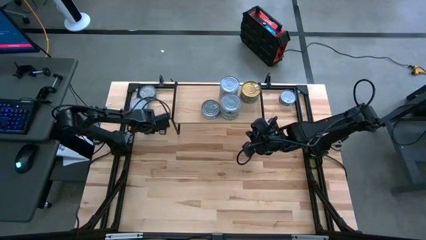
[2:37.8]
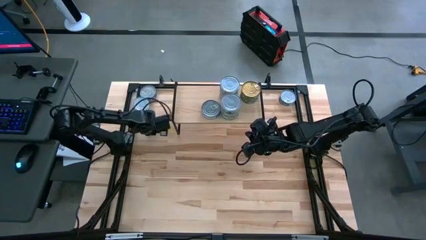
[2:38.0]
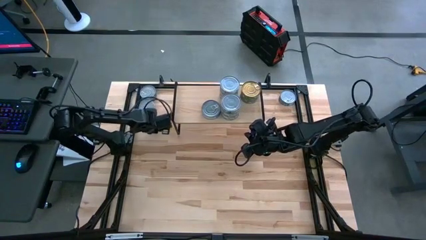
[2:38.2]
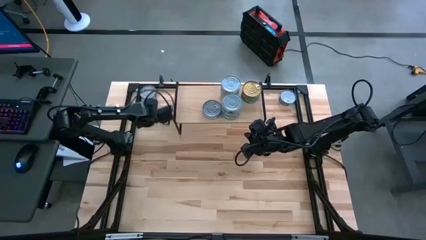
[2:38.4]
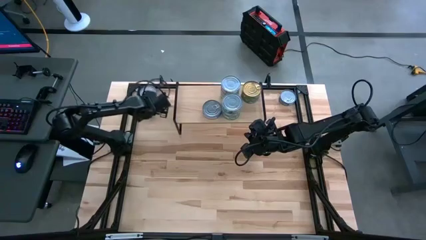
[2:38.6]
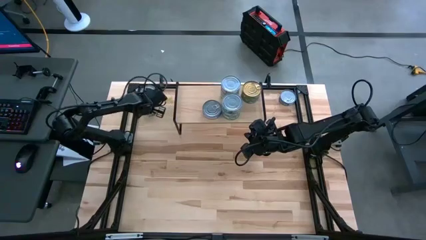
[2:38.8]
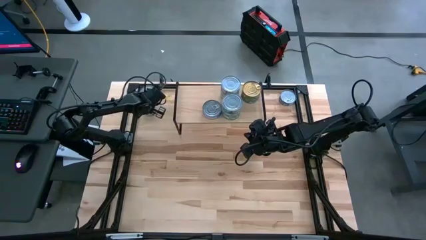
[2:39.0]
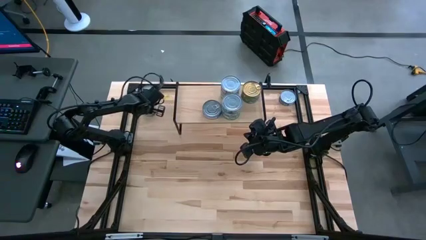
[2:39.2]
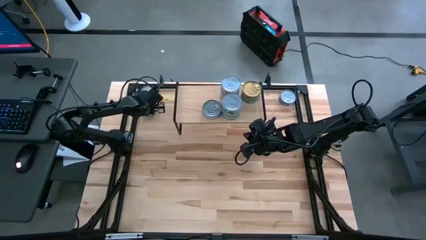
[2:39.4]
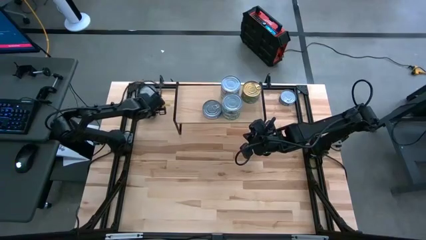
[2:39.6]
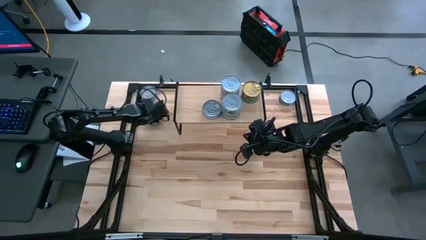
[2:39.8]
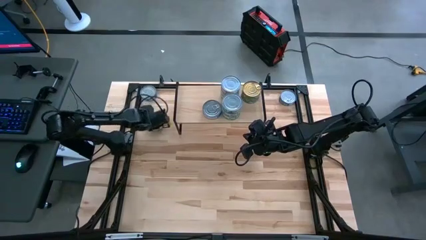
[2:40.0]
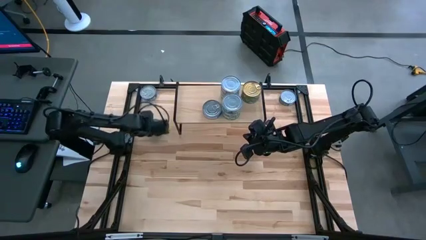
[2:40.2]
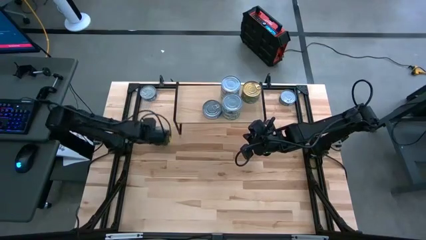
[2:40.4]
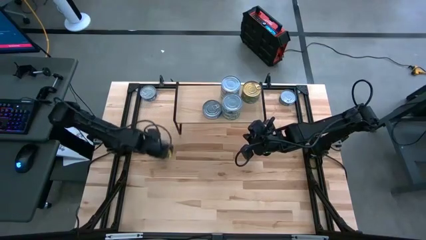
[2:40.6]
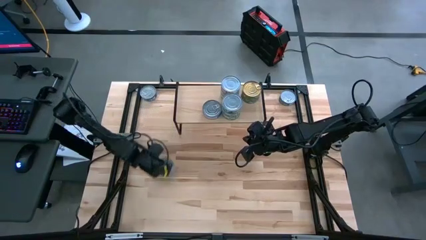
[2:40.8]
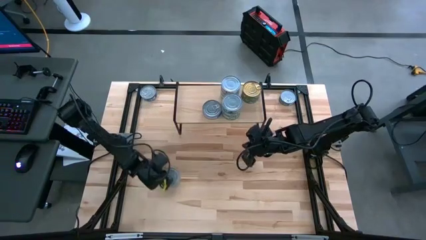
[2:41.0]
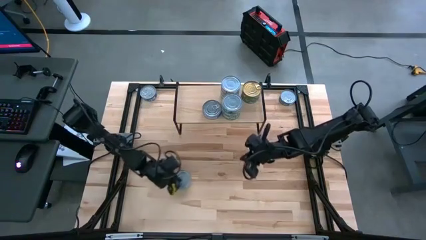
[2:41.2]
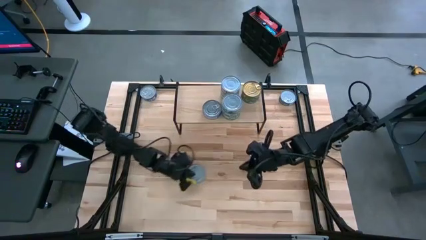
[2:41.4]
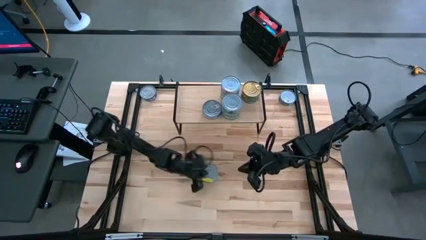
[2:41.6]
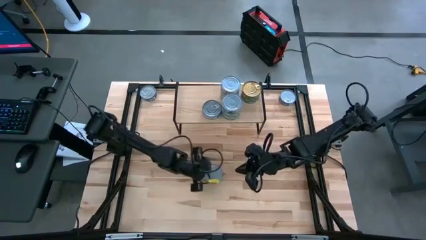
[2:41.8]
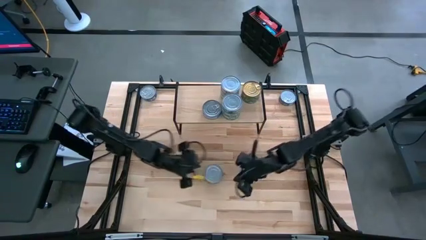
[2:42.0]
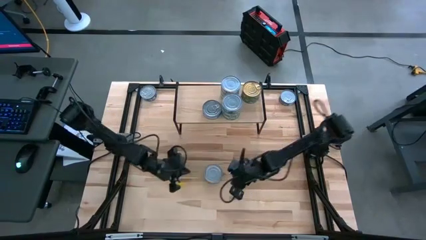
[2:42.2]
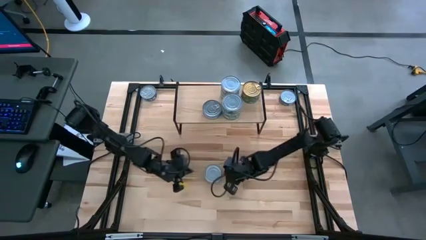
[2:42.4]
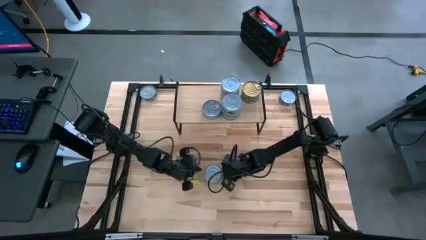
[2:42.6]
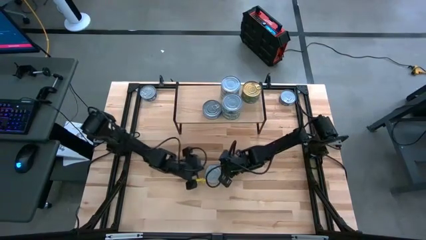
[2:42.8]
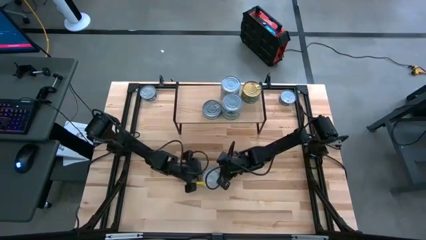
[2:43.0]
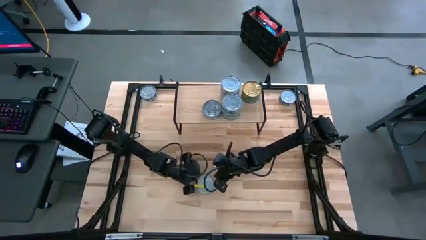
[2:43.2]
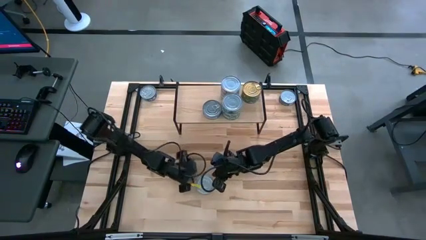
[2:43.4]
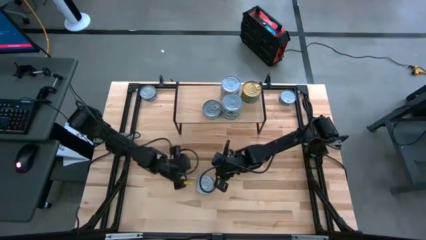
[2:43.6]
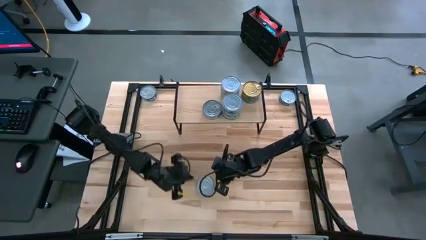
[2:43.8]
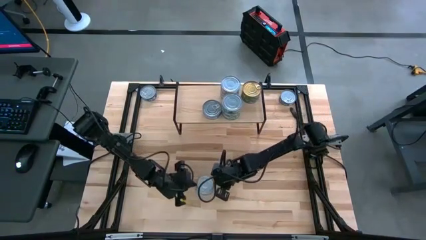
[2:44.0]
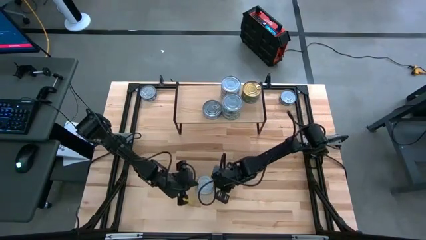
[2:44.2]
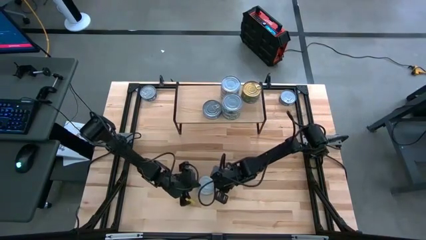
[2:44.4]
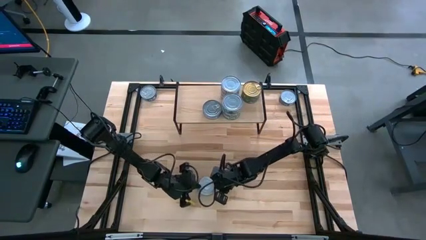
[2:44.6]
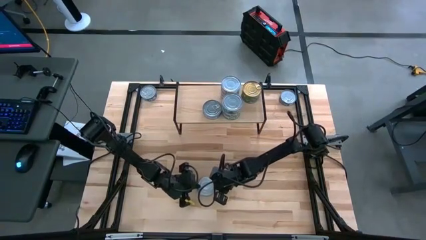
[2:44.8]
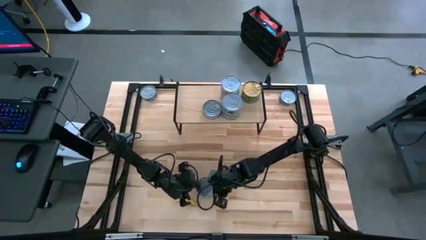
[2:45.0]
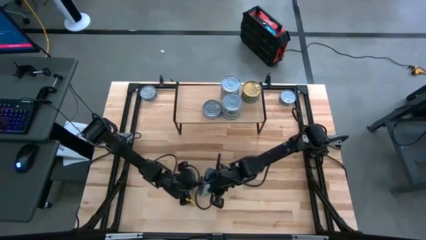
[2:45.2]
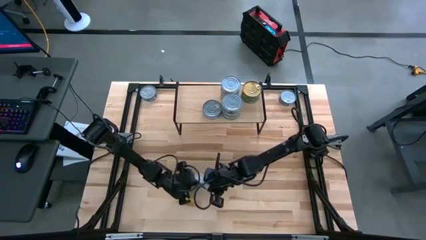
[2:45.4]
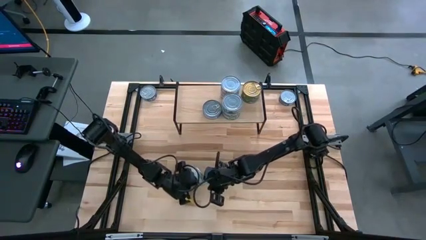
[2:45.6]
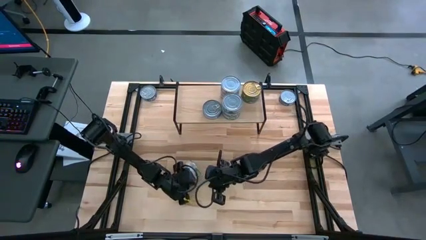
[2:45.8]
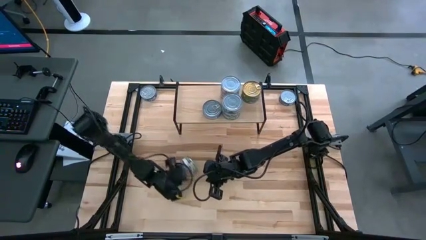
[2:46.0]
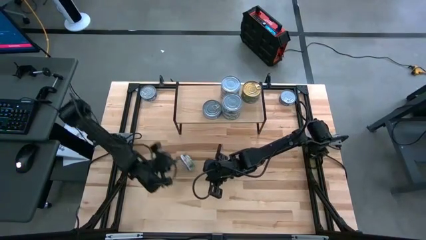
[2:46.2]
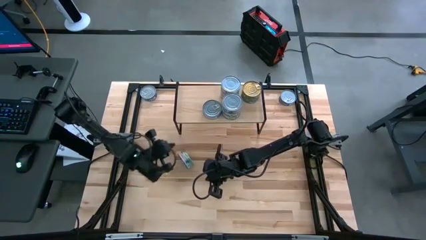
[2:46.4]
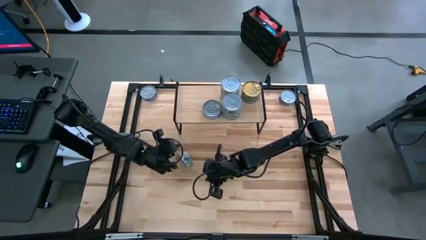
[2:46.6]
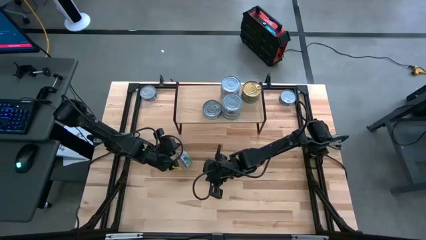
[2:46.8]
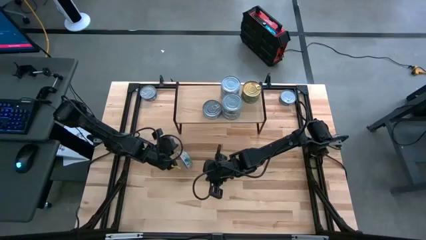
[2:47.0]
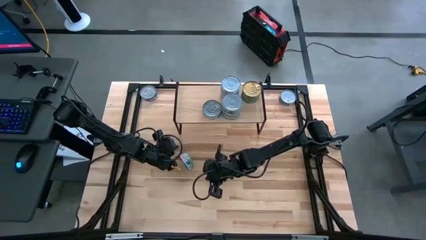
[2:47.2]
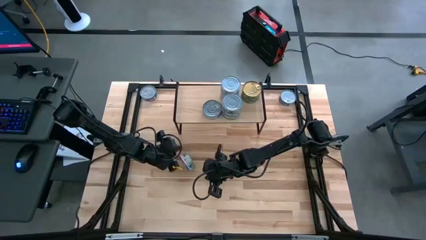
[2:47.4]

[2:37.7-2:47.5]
Task: Stack canned seafood by type on shelf
Stack the light green tuna can on top of the other light green tuna can on the shelf

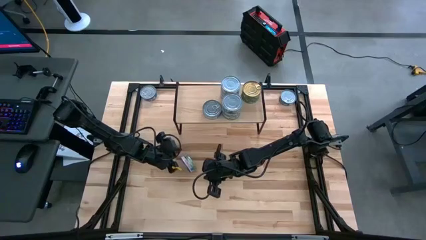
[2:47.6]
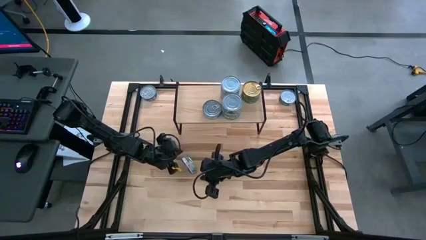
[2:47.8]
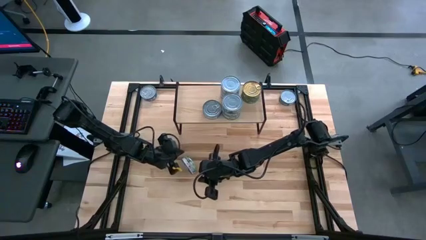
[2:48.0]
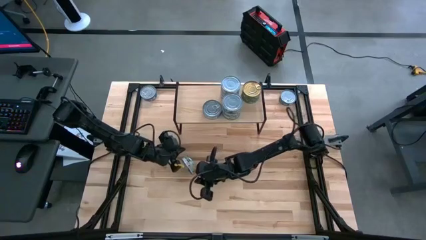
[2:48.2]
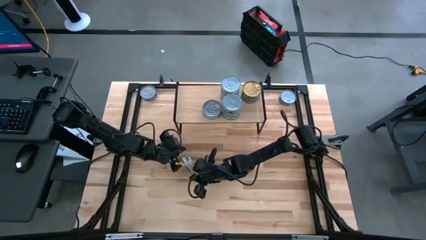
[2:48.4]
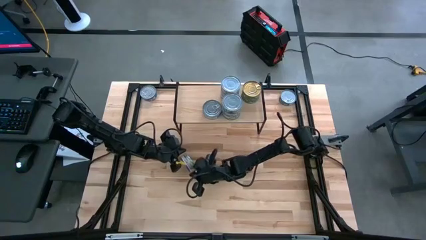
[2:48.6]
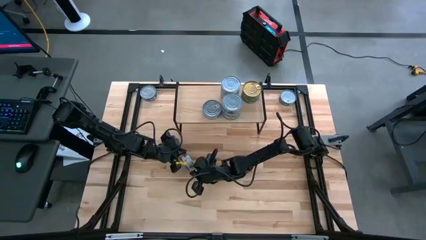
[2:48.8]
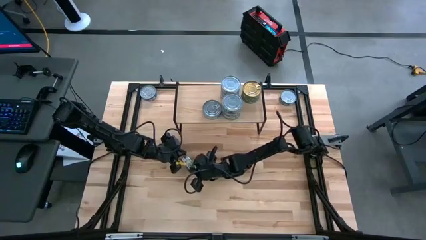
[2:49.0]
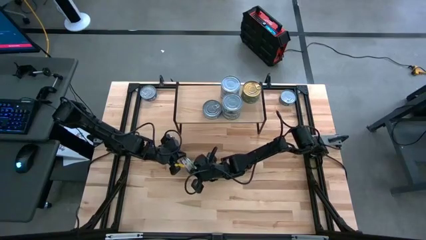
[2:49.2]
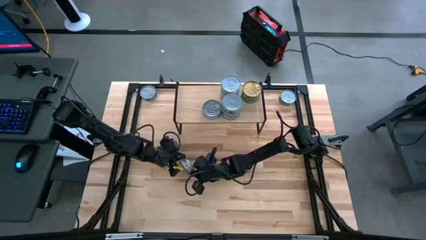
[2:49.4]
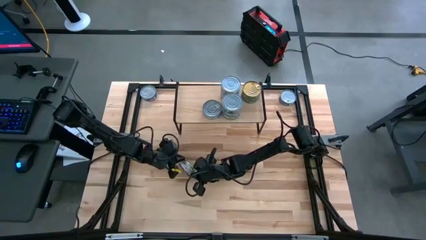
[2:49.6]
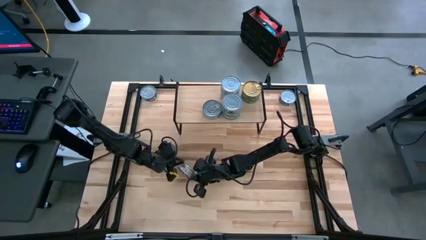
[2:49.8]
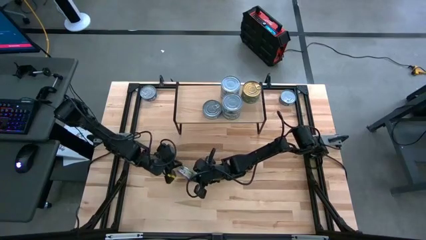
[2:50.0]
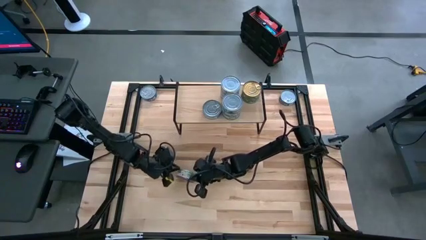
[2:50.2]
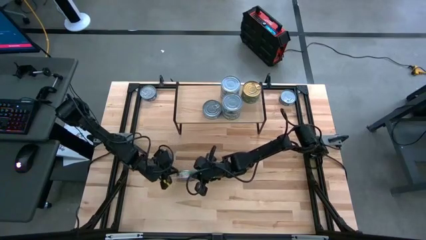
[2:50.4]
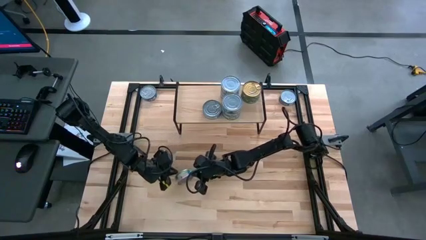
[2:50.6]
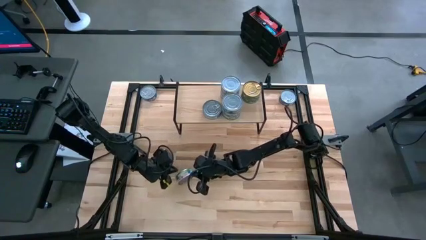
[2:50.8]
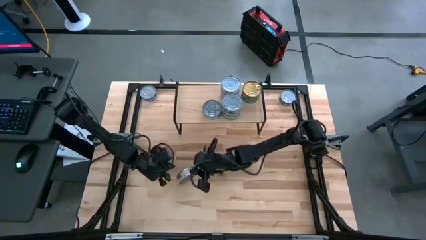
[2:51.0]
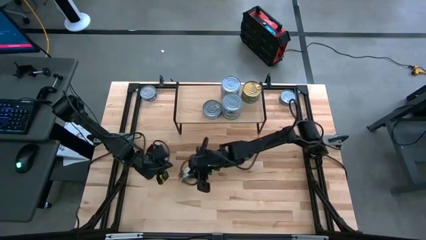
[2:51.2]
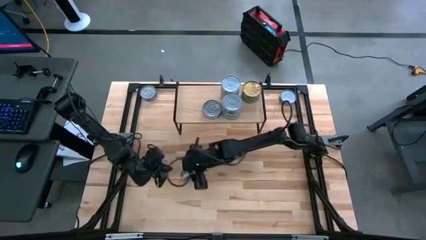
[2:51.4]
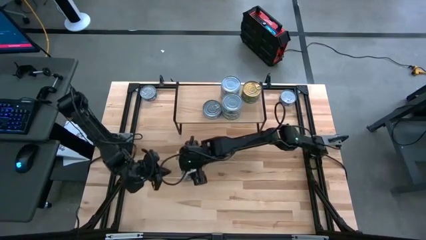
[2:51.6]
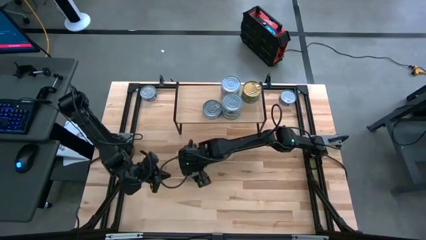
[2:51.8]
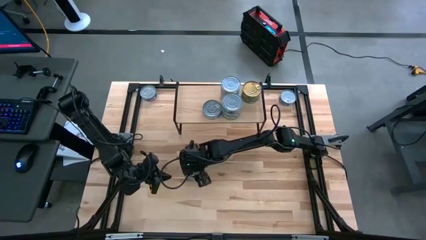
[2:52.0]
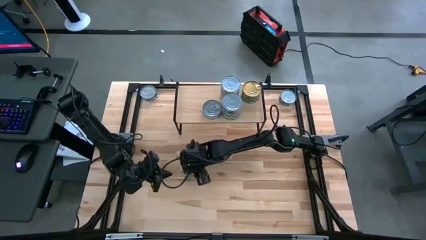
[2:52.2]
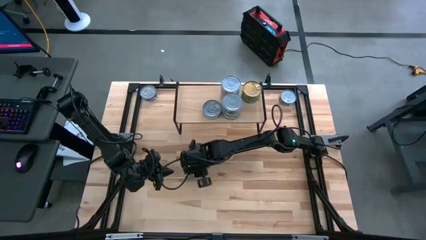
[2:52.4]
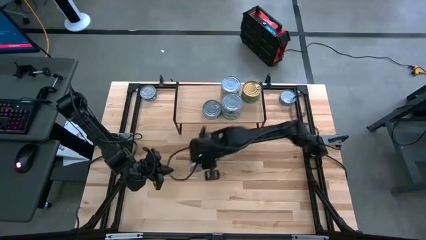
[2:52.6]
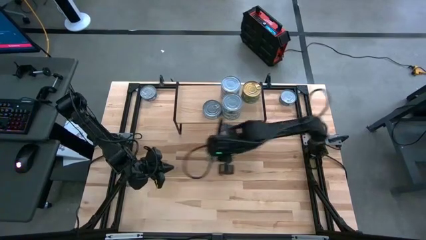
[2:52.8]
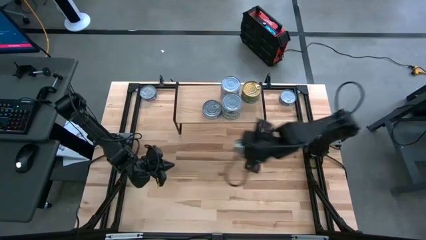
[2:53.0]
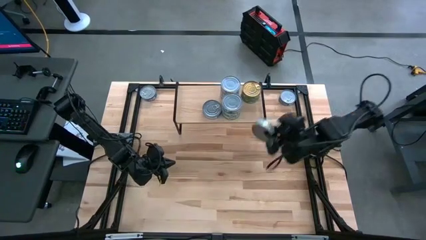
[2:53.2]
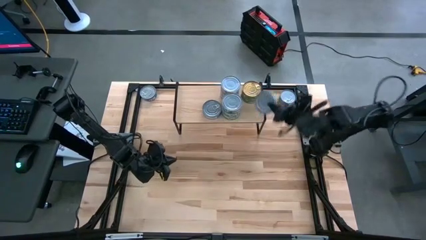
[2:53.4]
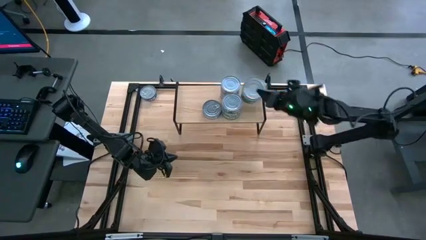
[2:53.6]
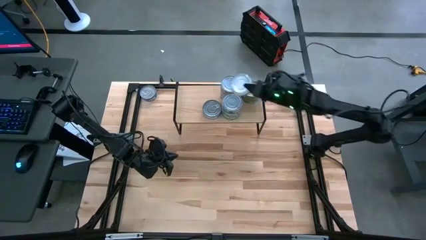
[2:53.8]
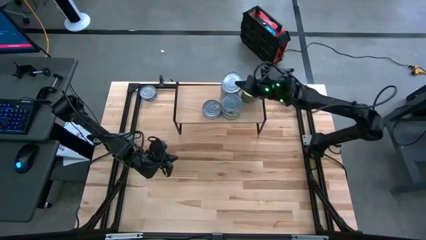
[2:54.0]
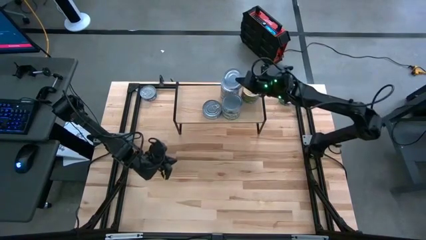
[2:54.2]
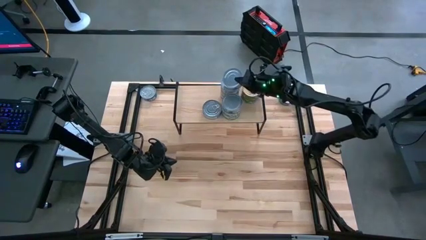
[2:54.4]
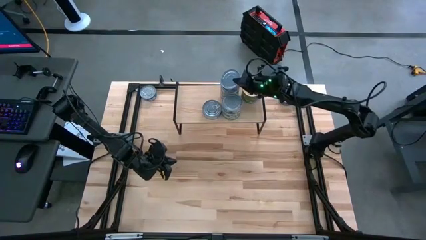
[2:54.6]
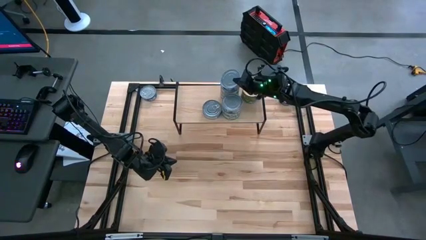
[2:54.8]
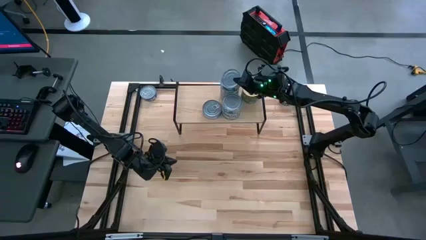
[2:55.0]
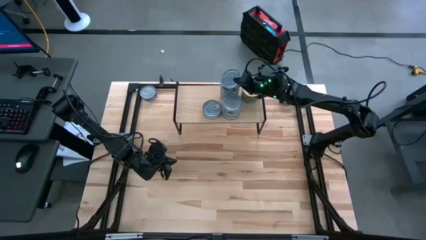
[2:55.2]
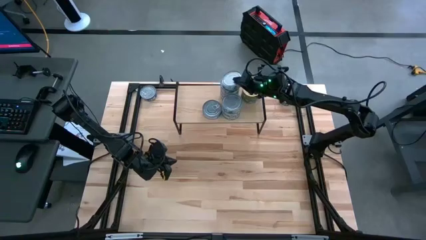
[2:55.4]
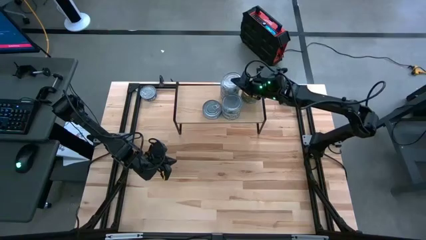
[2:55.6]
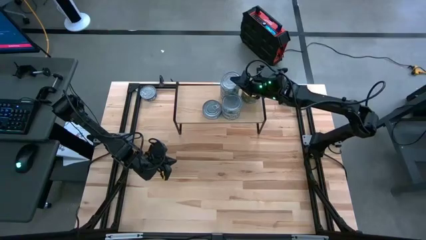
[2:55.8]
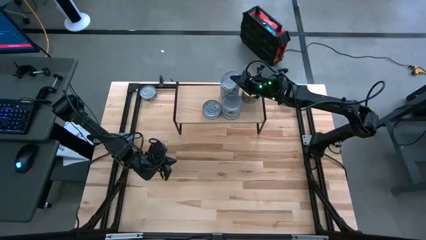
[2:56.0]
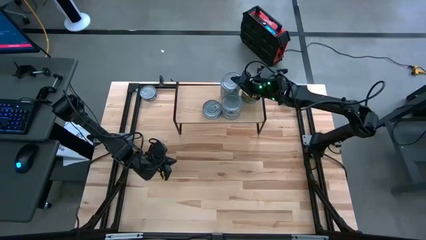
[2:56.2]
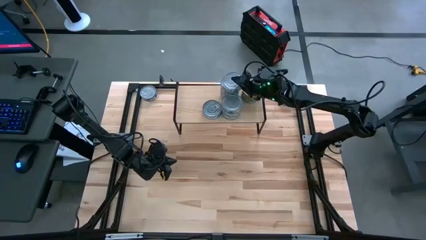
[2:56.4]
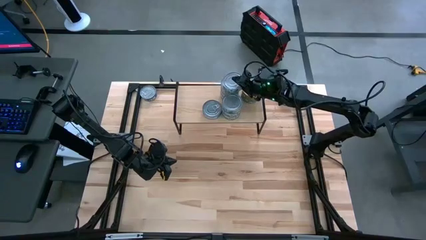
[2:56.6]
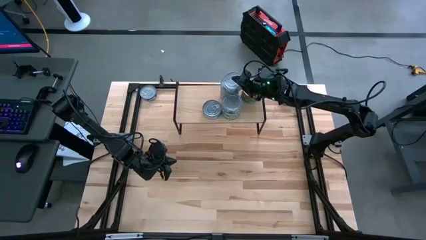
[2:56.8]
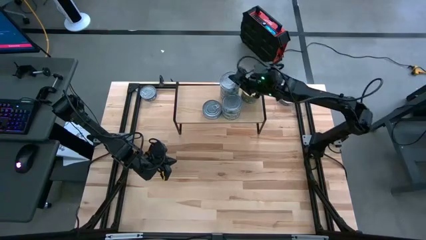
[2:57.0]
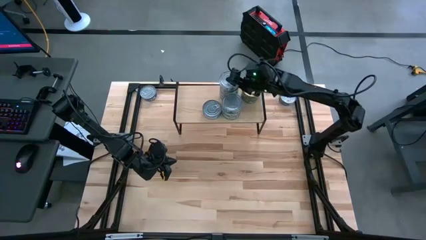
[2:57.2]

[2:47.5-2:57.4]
Stack the light green tuna can on top of the other light green tuna can on the shelf
